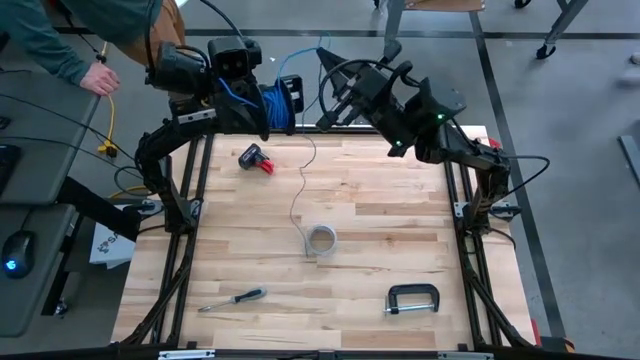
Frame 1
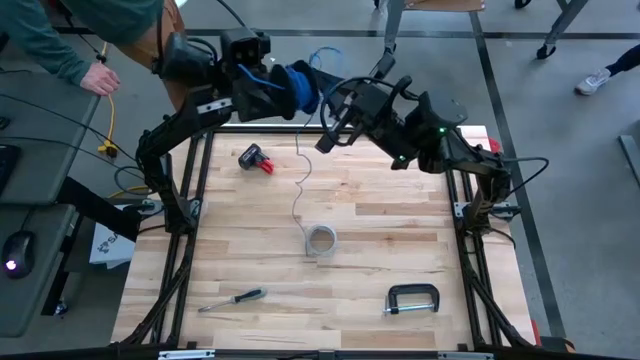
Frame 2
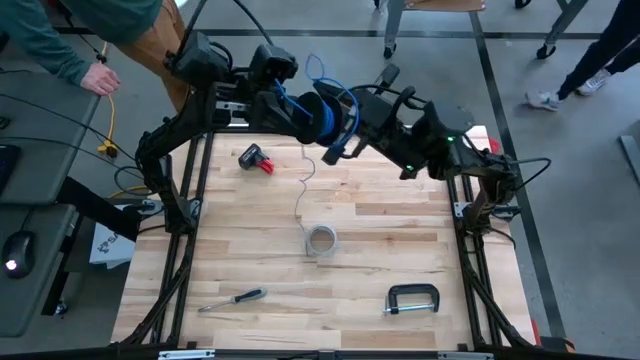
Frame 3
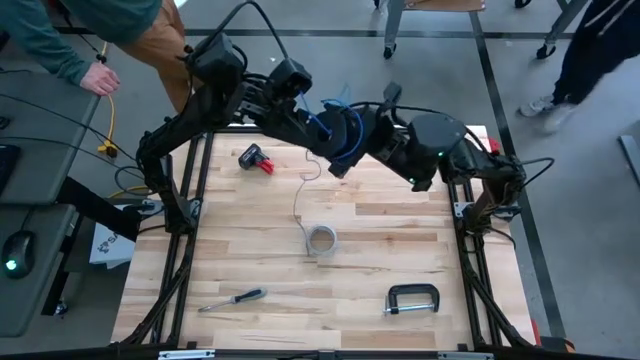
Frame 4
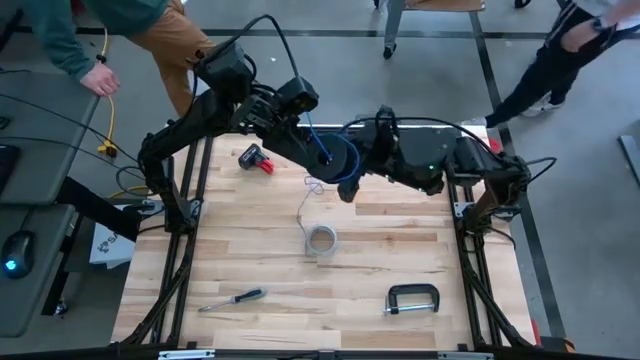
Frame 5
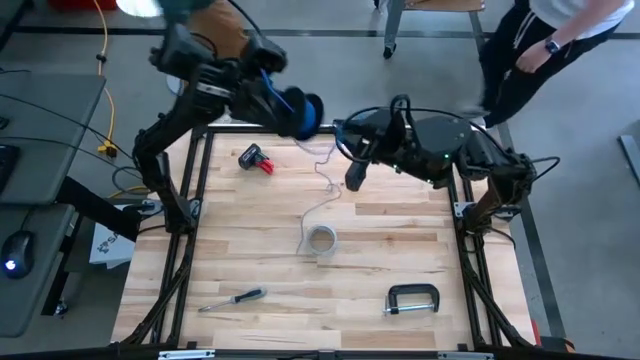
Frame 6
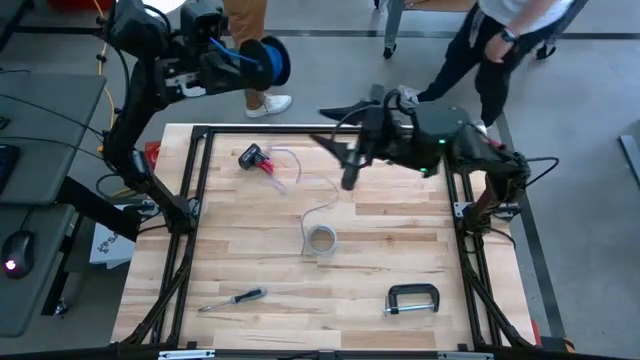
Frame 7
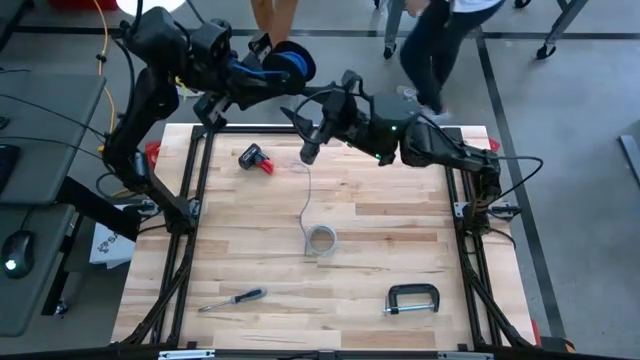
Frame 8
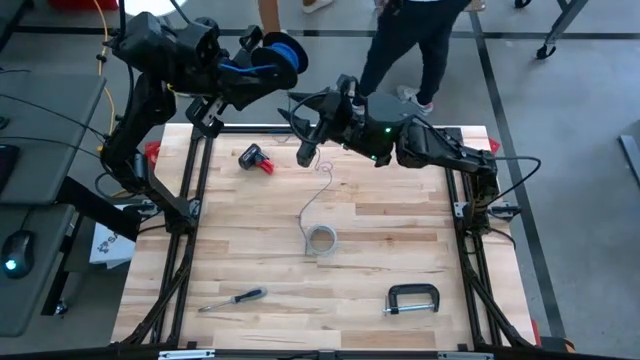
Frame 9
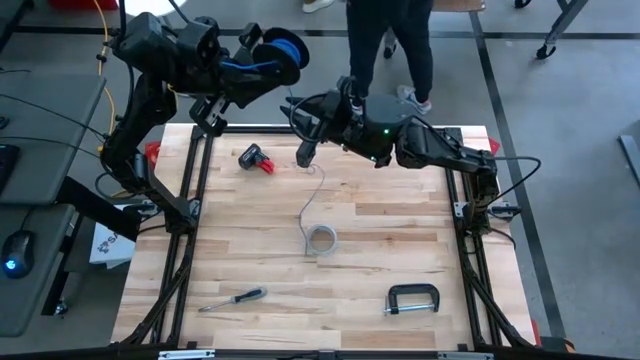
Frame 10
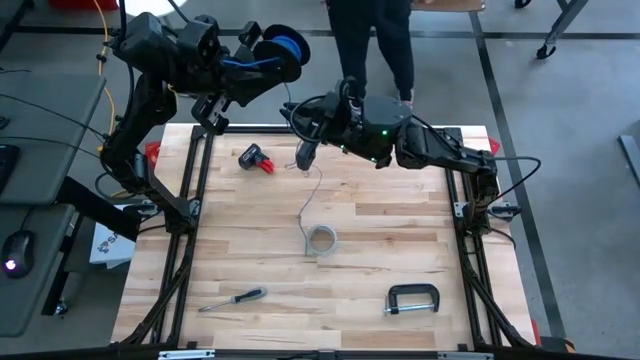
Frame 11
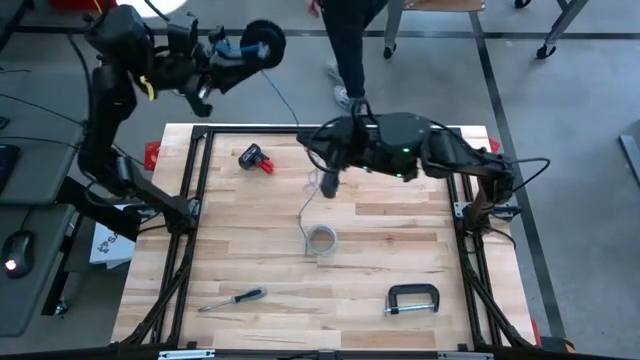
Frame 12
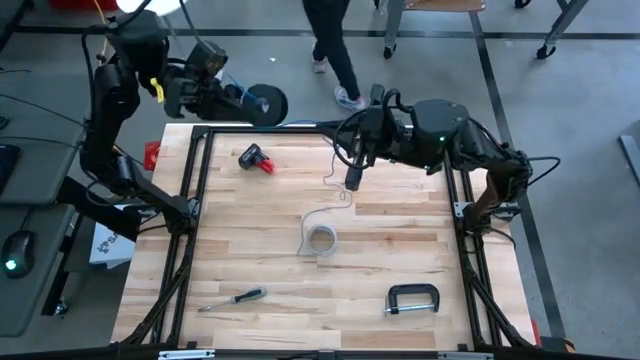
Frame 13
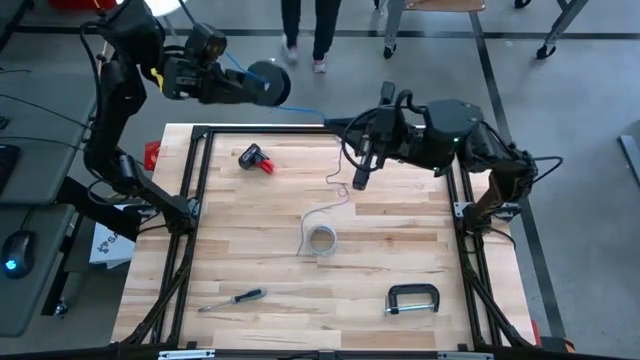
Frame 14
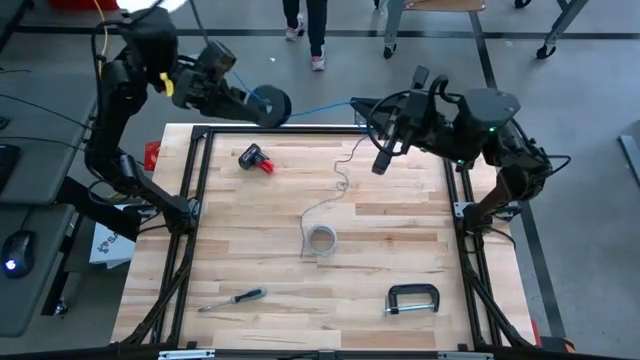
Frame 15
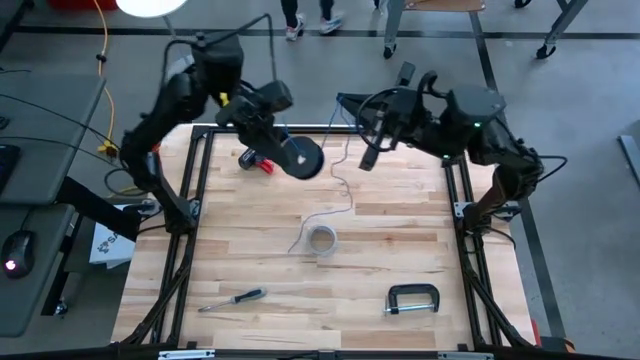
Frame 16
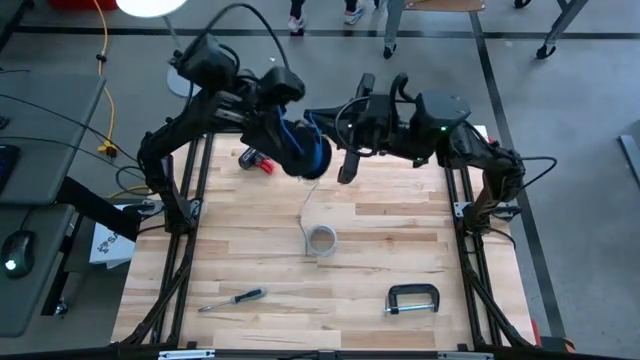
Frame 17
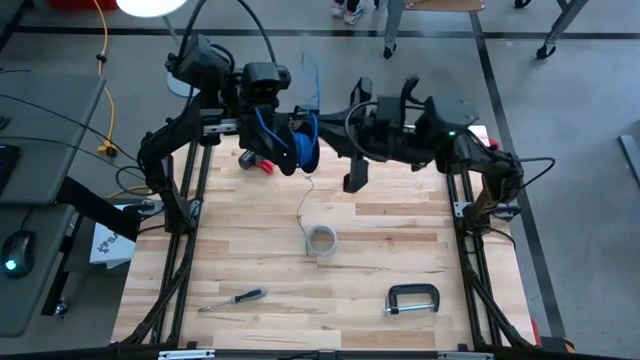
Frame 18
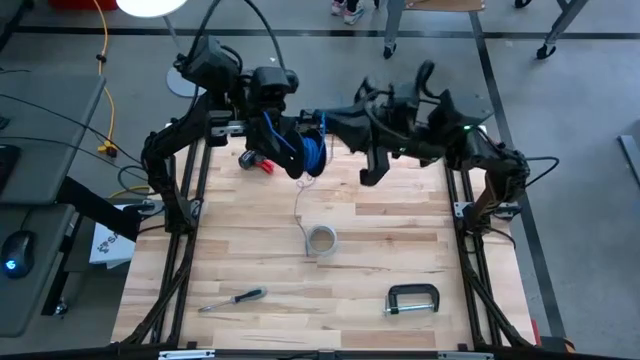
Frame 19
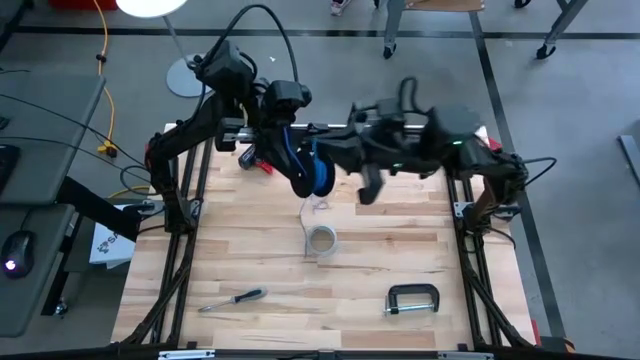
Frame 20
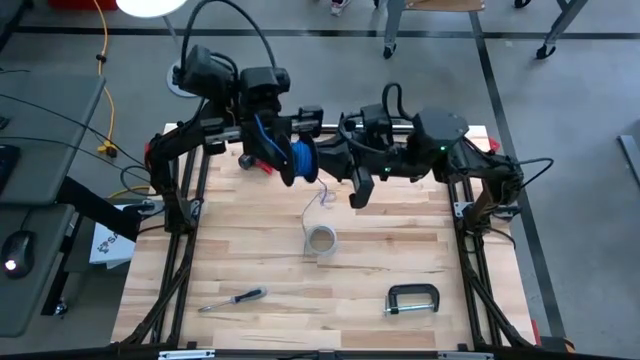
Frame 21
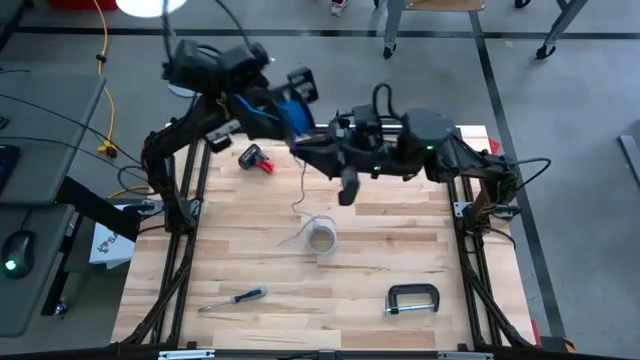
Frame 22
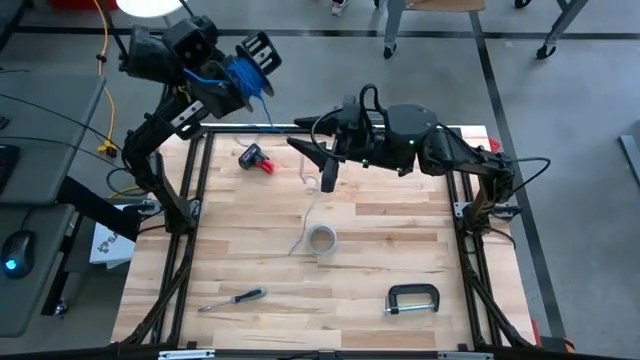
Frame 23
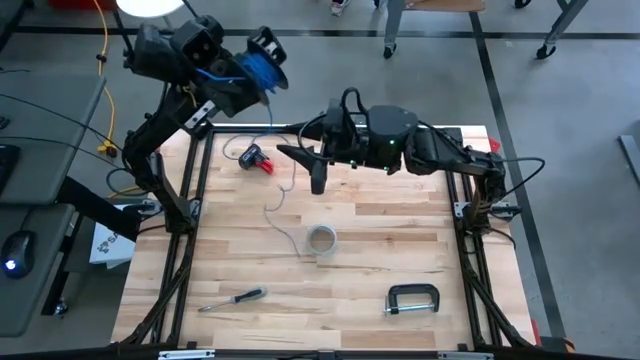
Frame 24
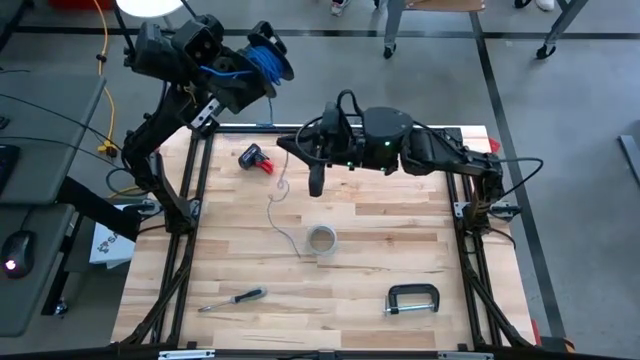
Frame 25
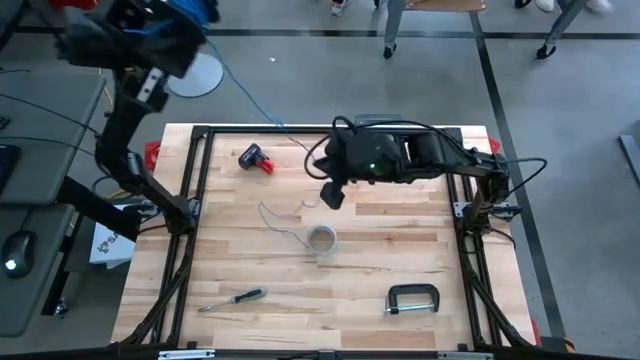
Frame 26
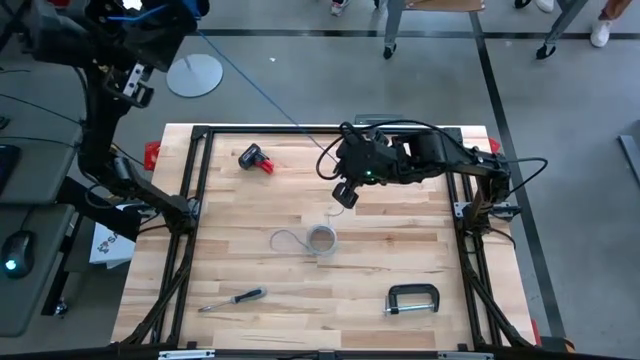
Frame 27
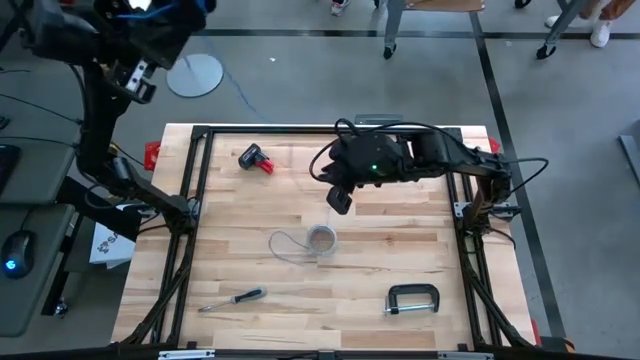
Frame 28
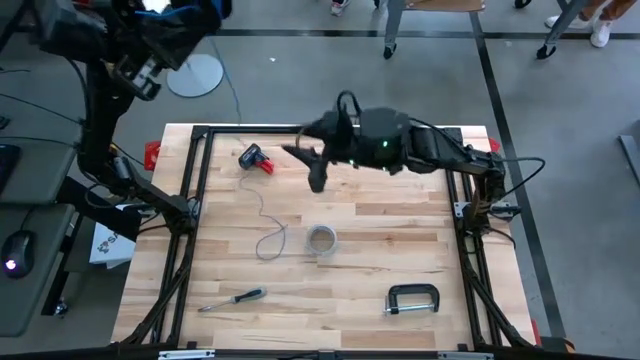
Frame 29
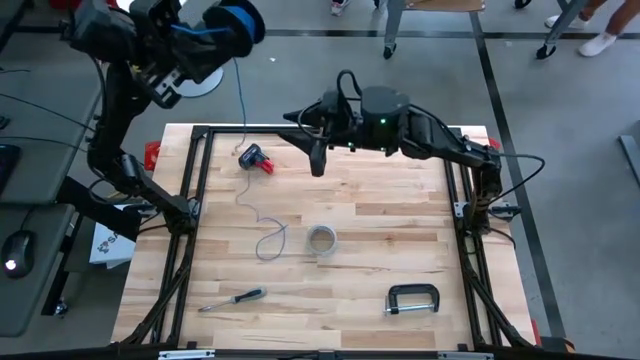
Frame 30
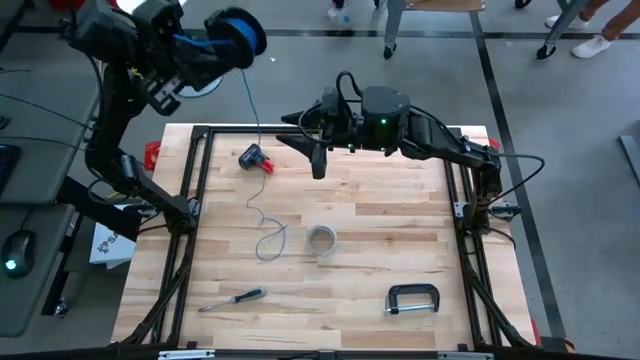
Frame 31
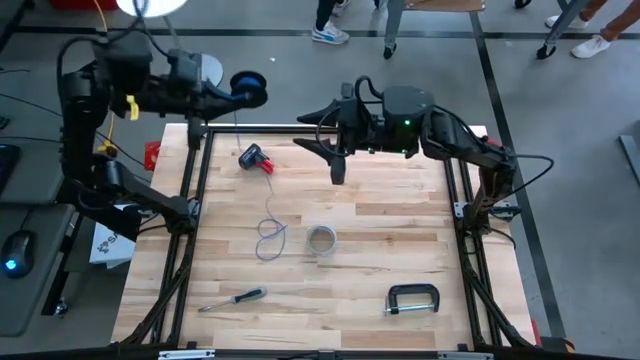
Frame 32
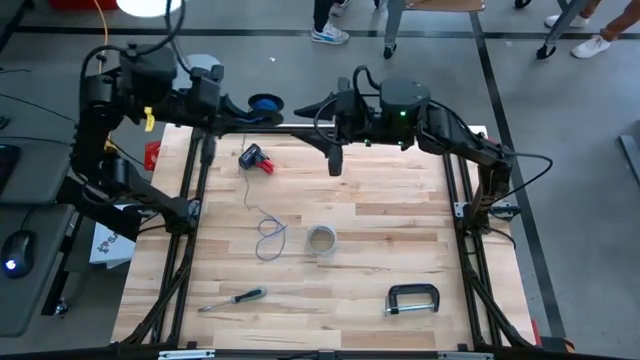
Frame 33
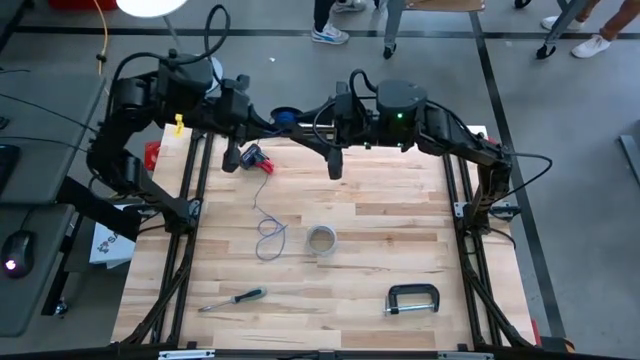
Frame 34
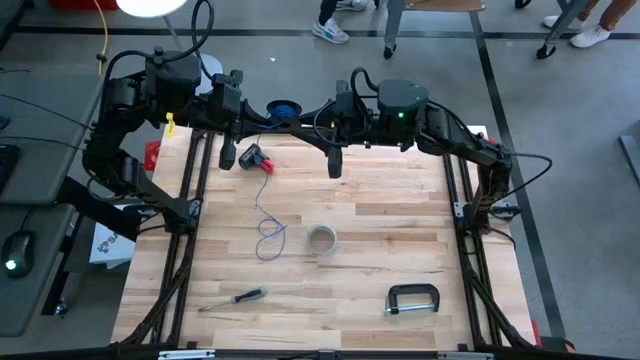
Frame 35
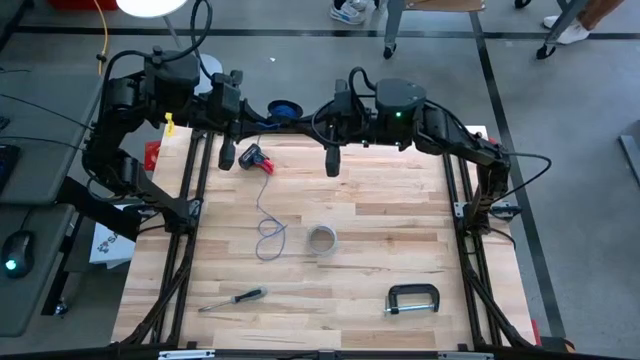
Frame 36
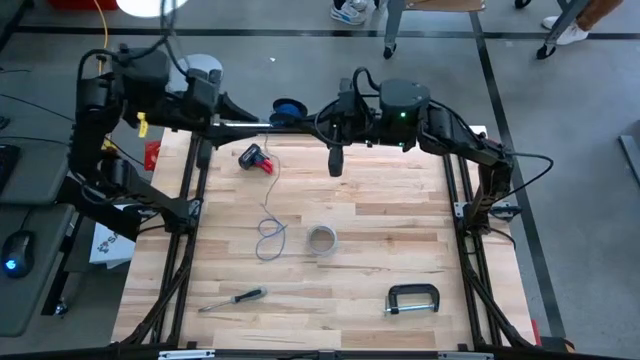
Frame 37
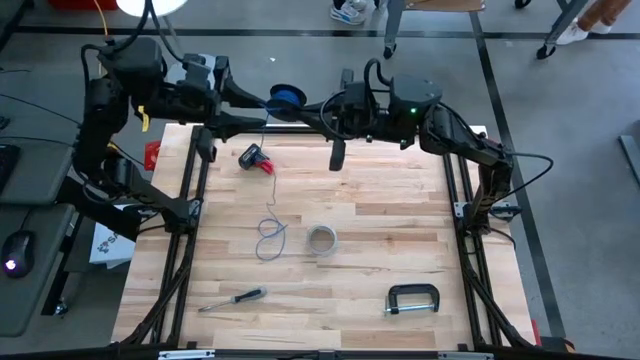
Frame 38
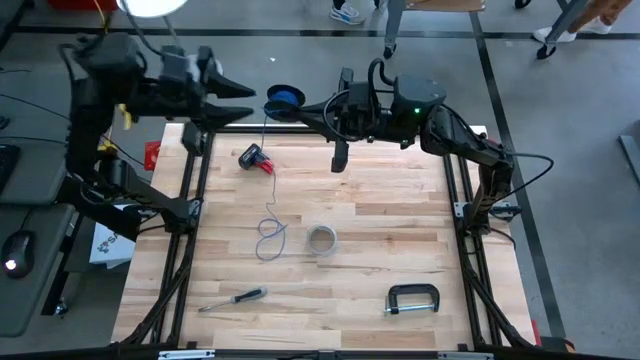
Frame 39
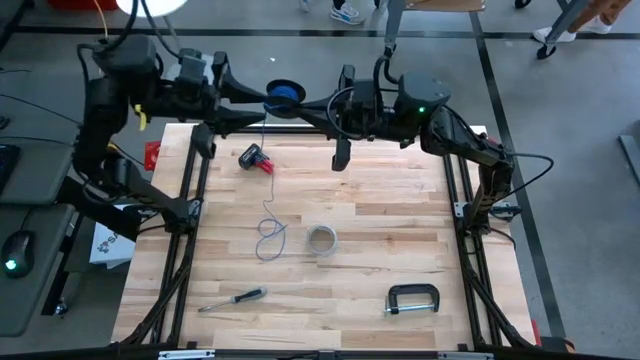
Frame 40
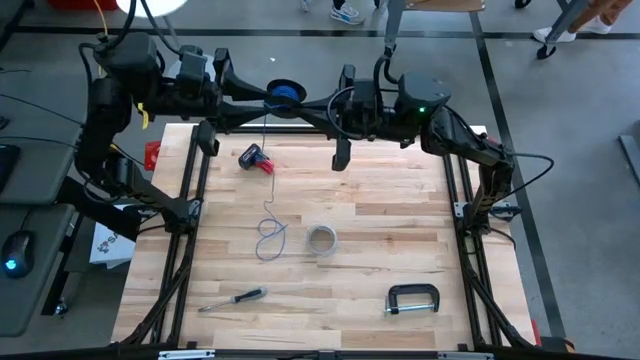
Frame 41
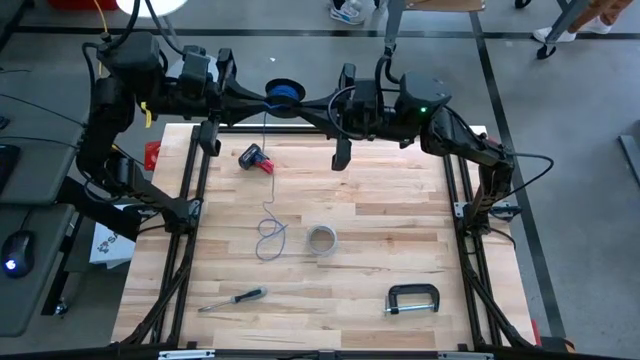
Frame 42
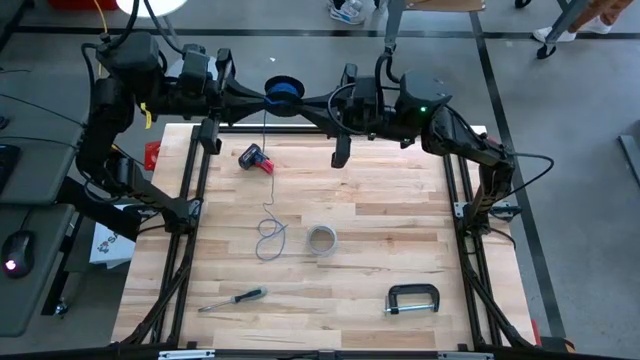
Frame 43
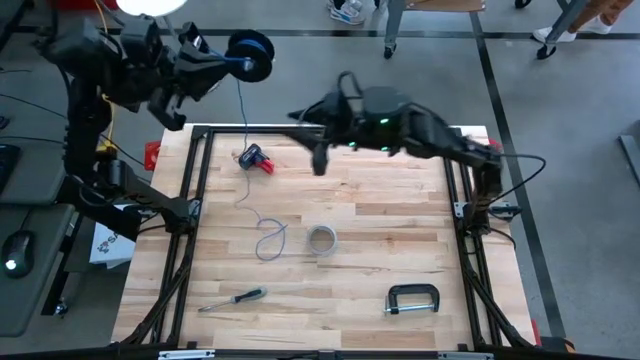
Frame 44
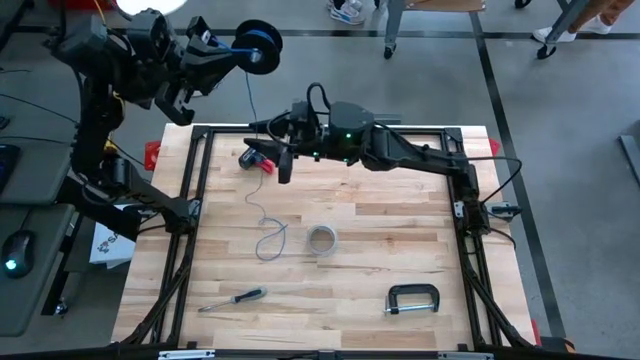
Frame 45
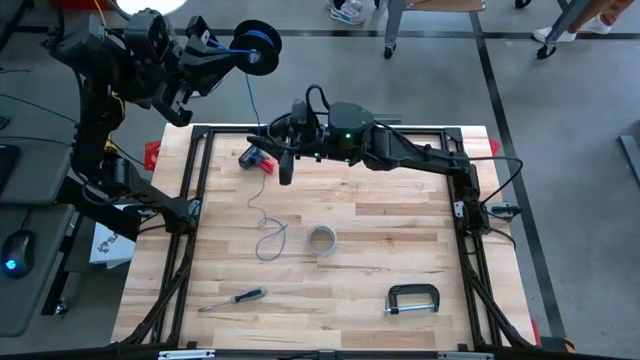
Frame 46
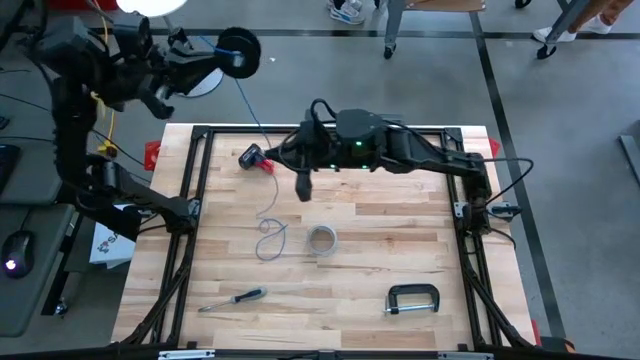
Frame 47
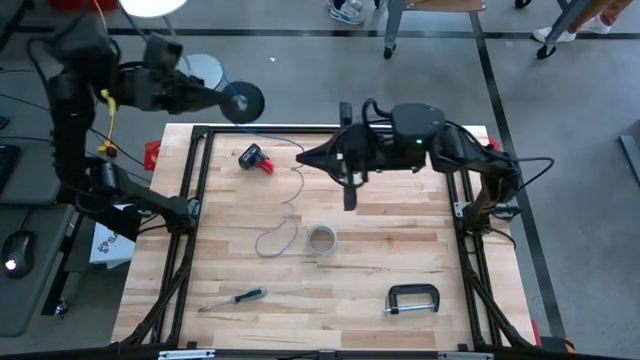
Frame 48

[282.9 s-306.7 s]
Task: Coil cords
Coil the blue wire on the spool
